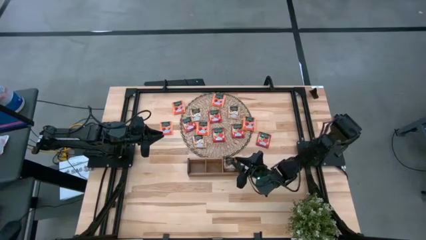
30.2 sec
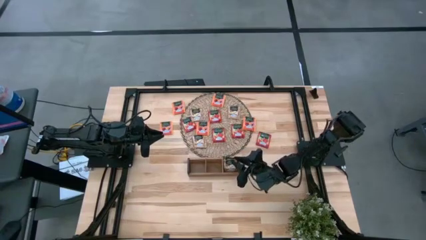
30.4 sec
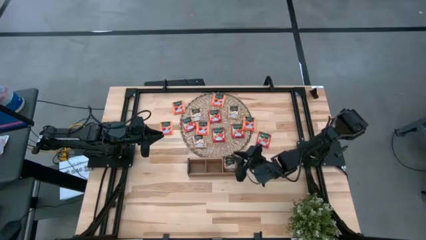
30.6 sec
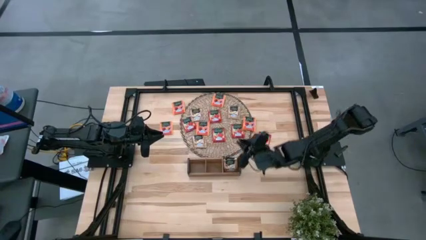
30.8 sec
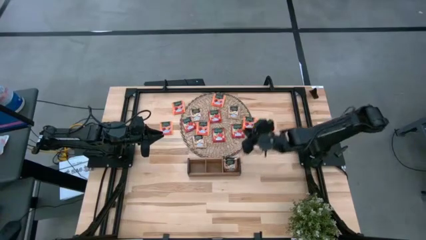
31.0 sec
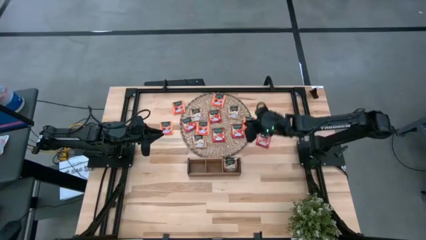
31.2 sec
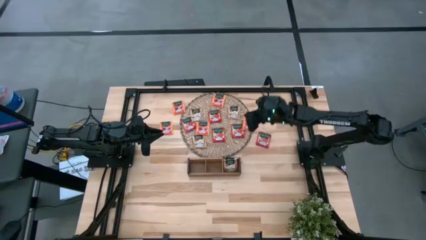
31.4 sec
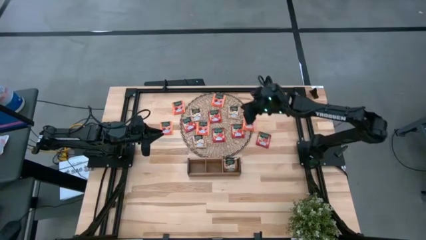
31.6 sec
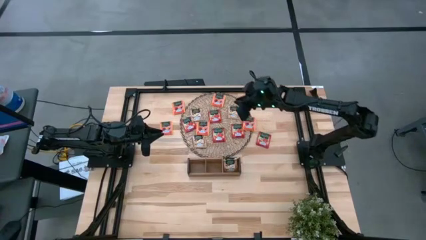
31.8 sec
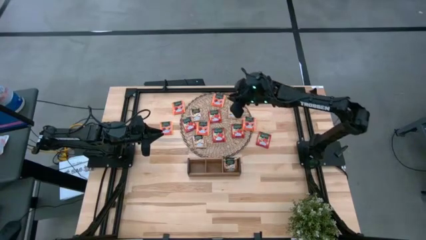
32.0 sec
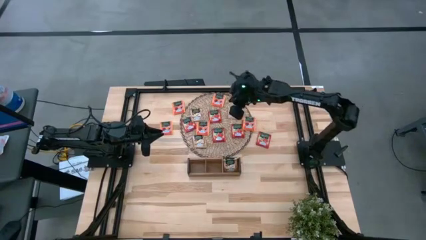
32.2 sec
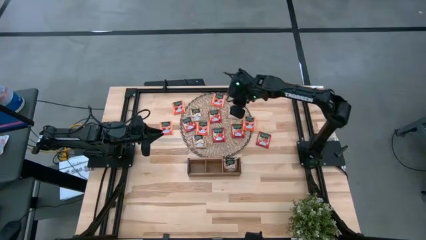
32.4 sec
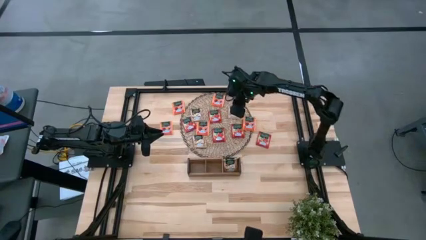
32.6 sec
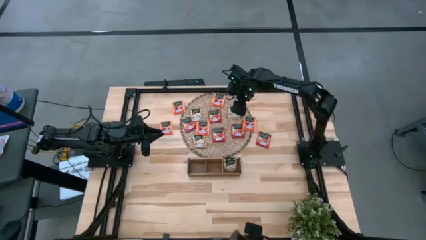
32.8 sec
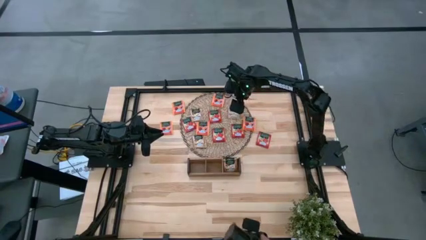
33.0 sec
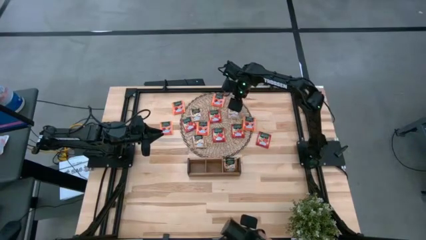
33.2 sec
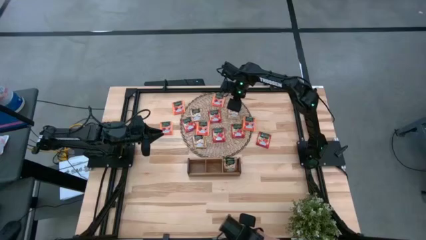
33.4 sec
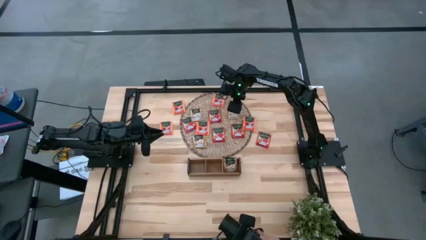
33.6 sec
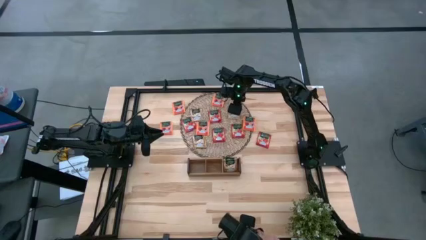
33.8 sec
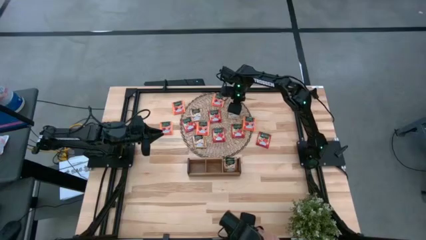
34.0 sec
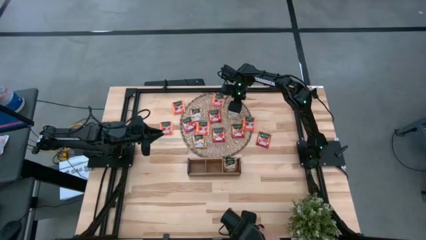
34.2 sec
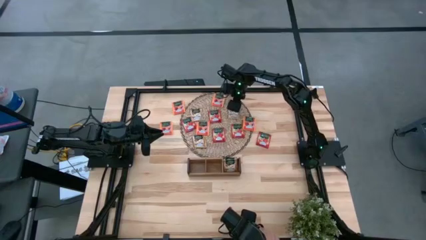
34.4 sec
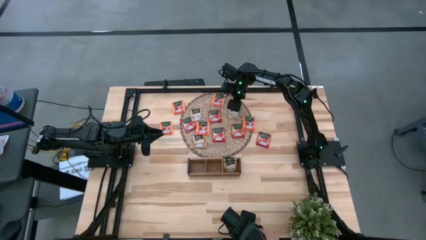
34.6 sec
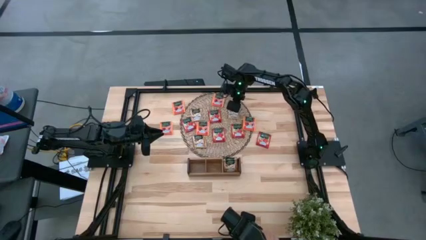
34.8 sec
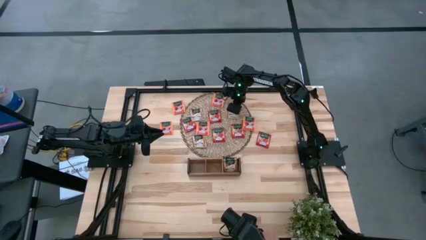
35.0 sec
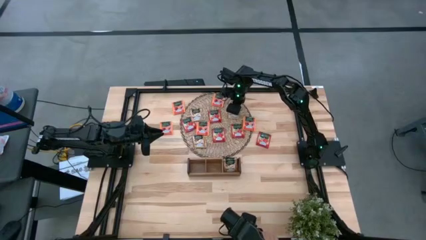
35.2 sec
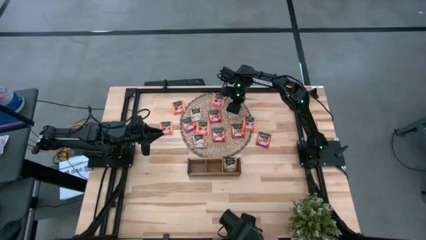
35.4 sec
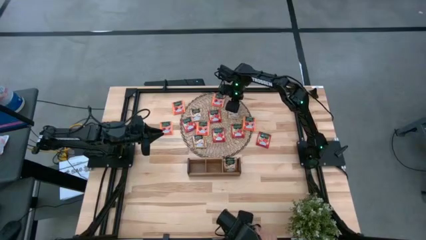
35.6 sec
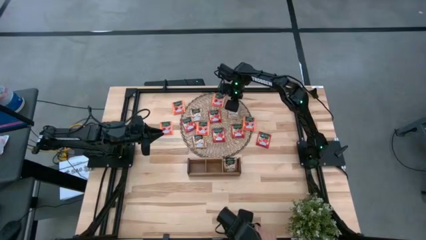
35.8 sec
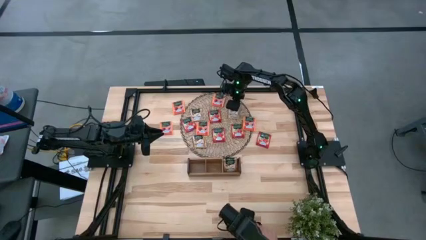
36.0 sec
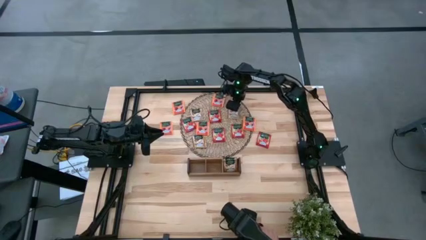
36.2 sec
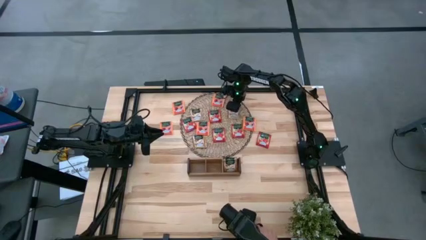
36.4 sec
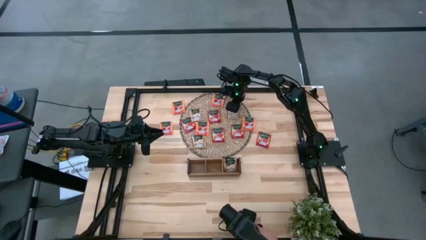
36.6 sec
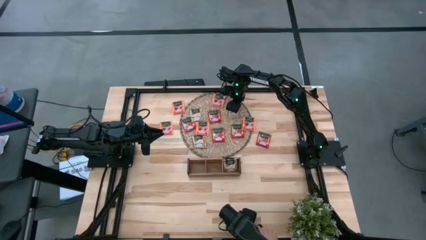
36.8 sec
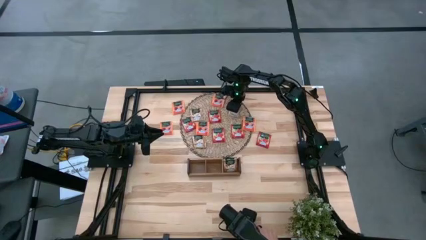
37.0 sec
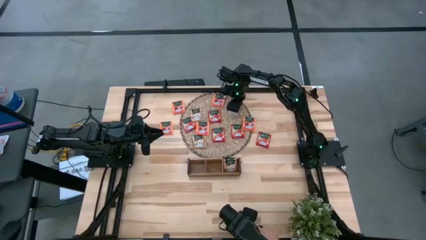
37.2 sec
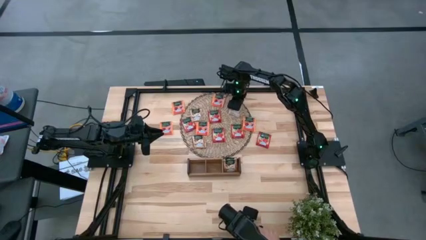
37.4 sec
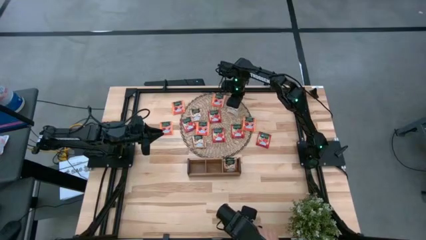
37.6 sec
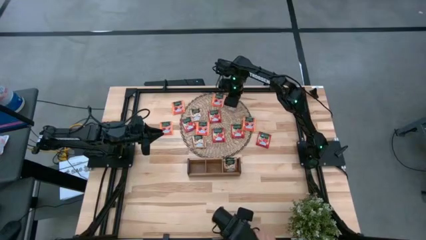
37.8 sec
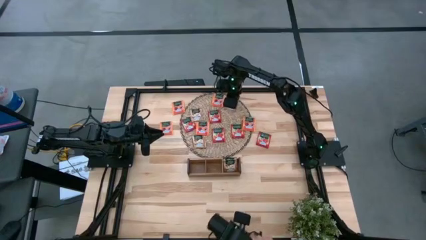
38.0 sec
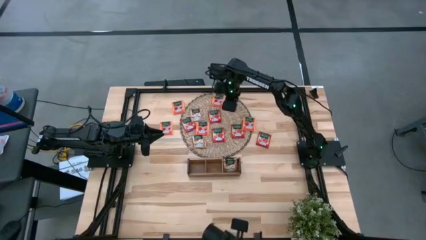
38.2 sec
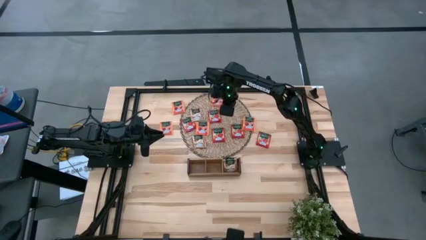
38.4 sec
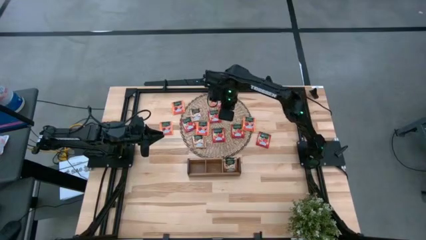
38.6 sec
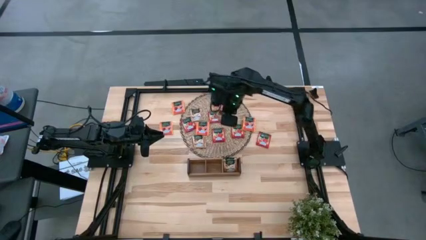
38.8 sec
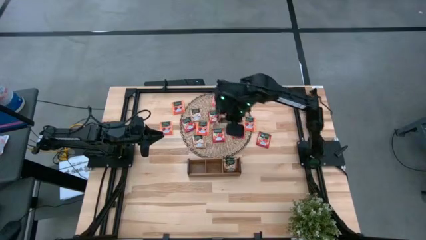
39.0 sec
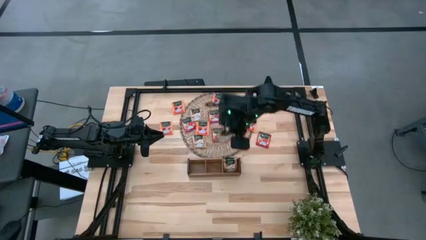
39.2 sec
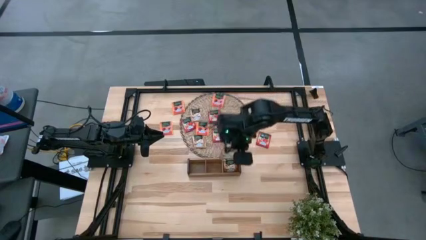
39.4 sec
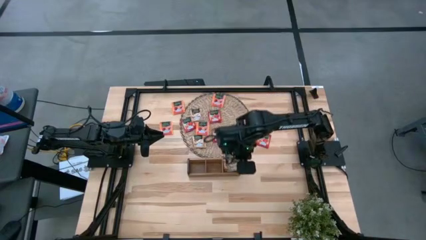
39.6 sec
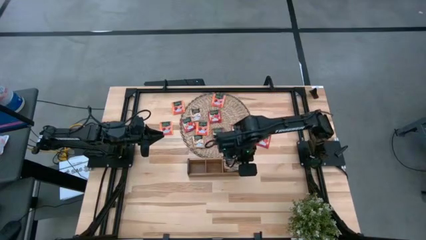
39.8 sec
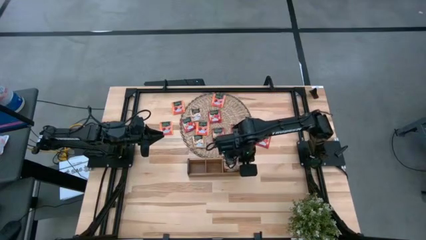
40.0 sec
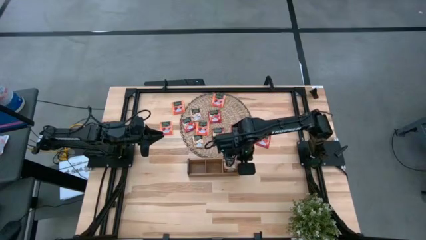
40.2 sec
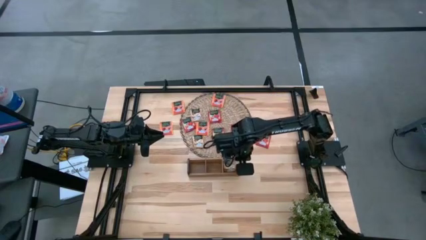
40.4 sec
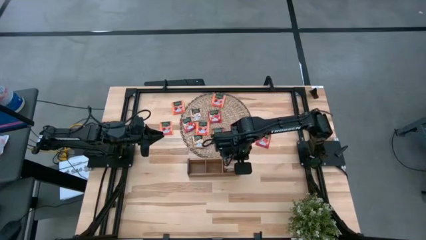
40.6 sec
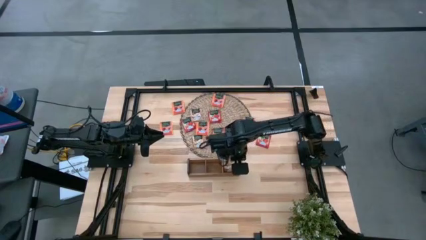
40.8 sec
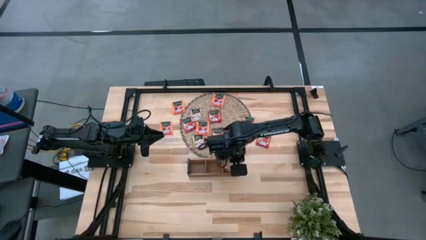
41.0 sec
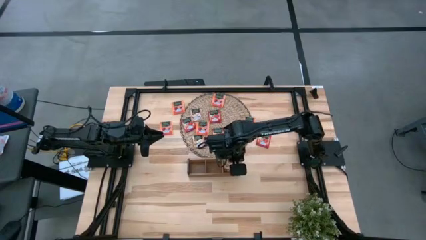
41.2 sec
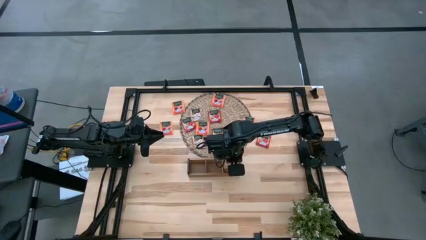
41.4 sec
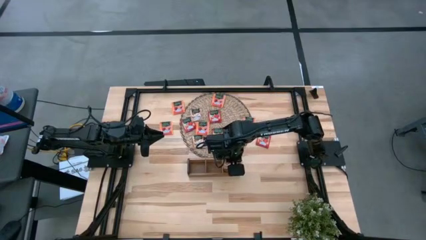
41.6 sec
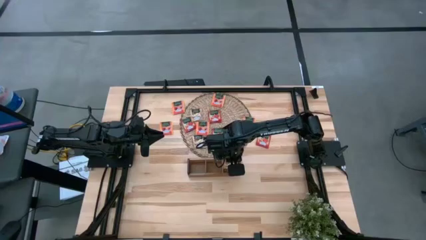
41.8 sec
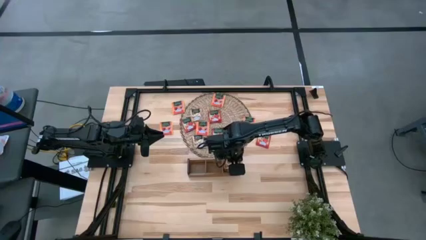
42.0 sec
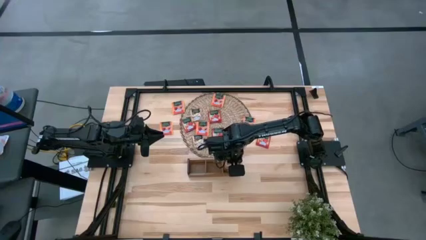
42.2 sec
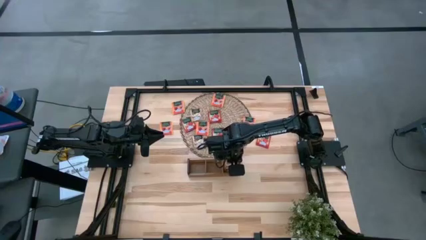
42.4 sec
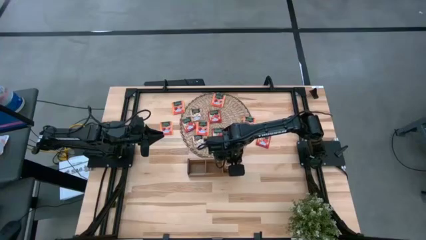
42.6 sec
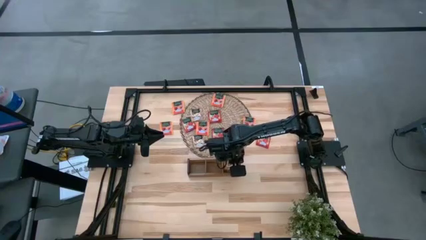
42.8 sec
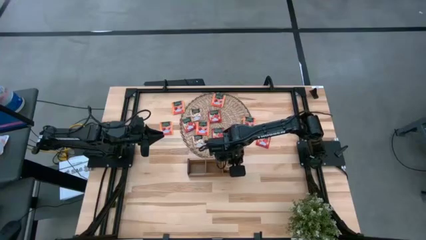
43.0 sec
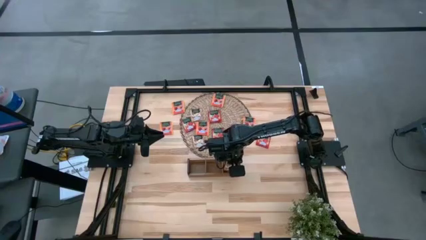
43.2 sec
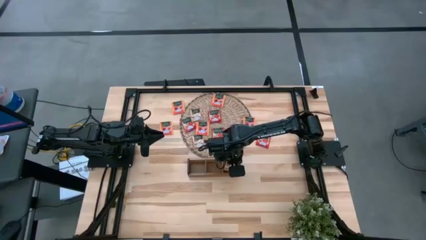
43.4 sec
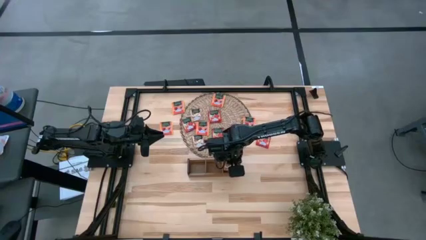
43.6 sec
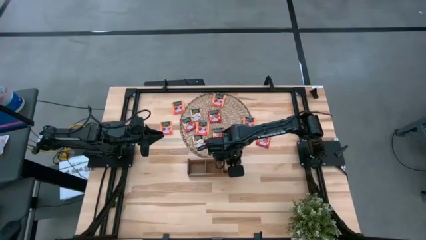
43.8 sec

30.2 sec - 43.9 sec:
Task: Pick & Place Tea
Put the gold tea bag into the right section of the wooden organizer
